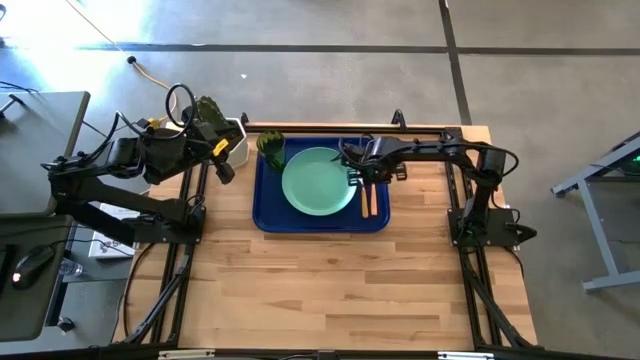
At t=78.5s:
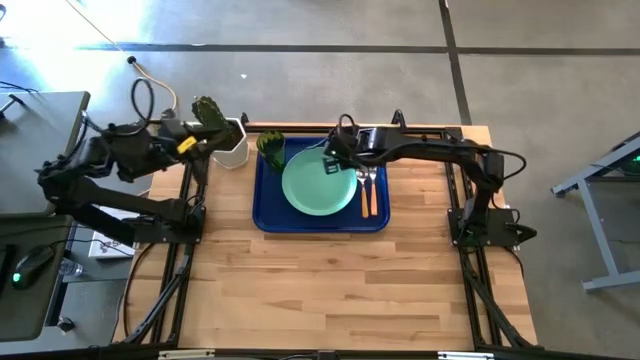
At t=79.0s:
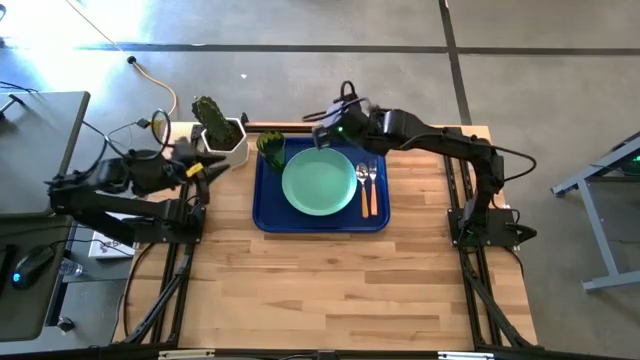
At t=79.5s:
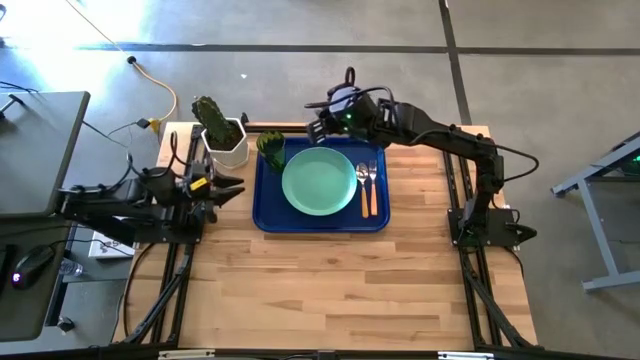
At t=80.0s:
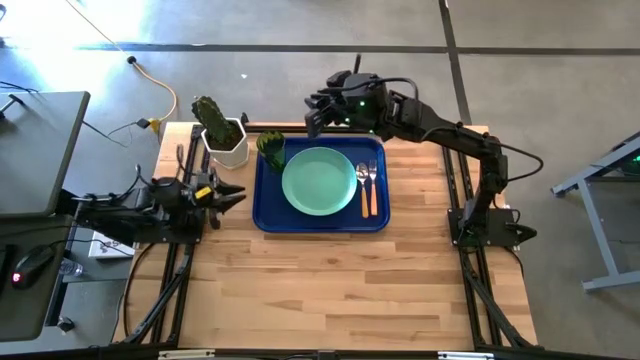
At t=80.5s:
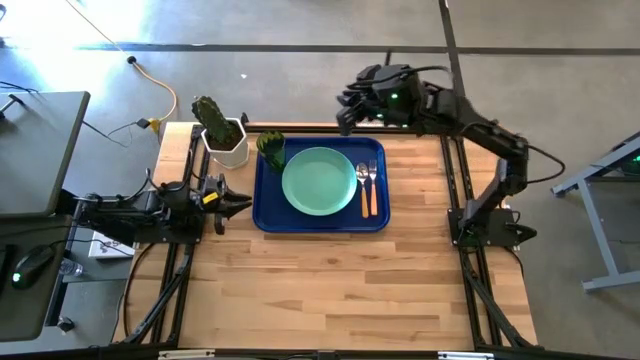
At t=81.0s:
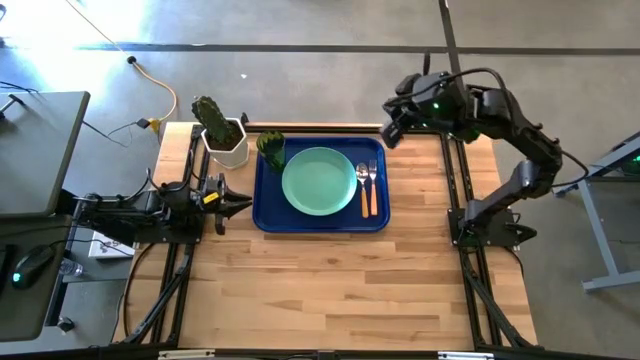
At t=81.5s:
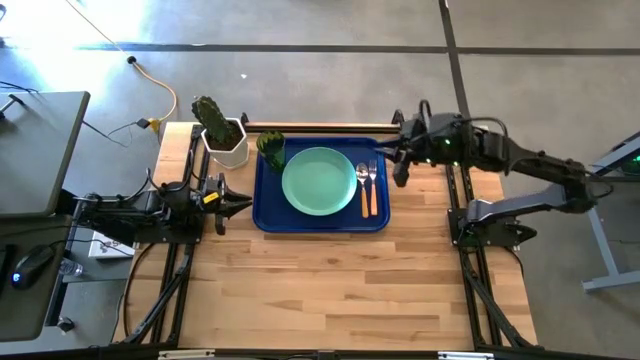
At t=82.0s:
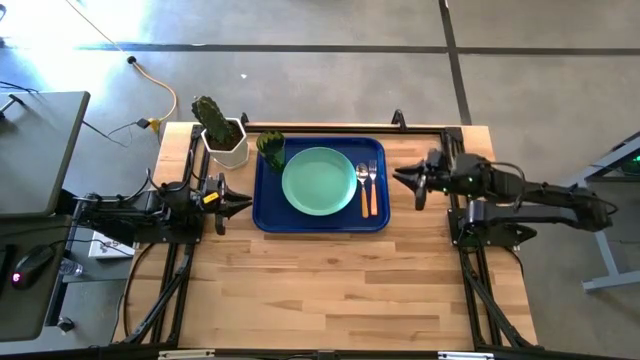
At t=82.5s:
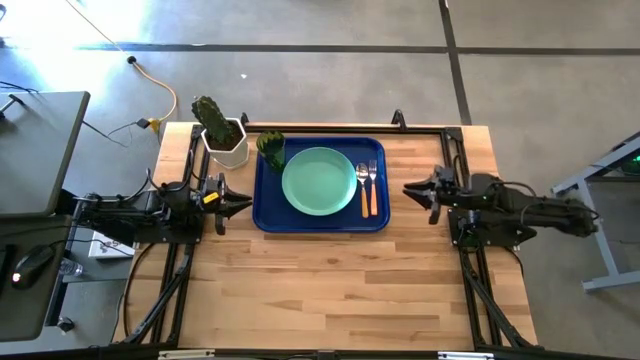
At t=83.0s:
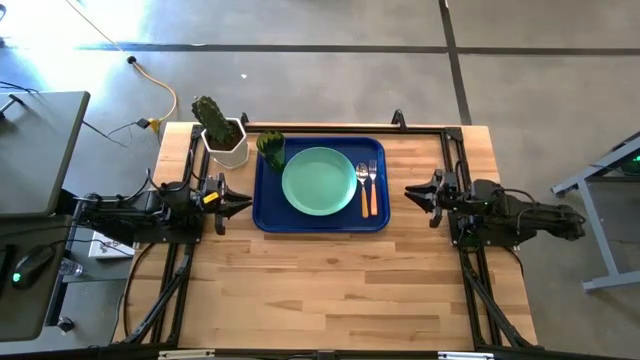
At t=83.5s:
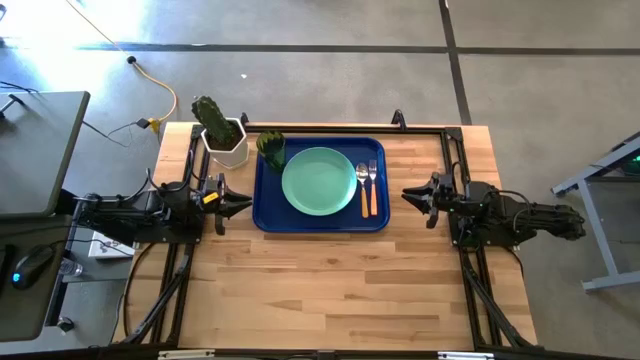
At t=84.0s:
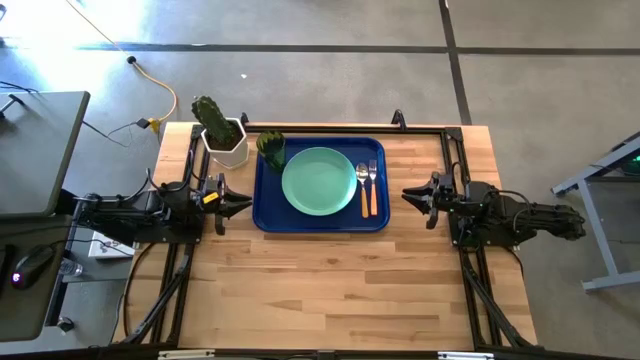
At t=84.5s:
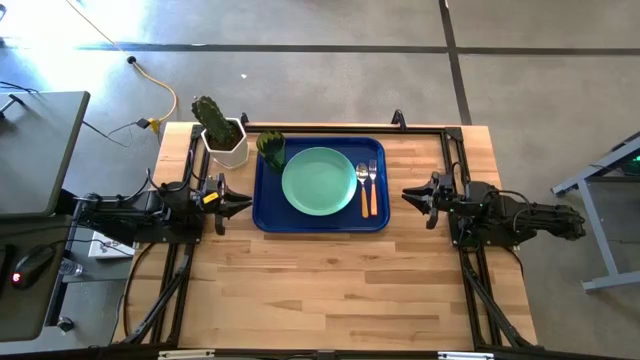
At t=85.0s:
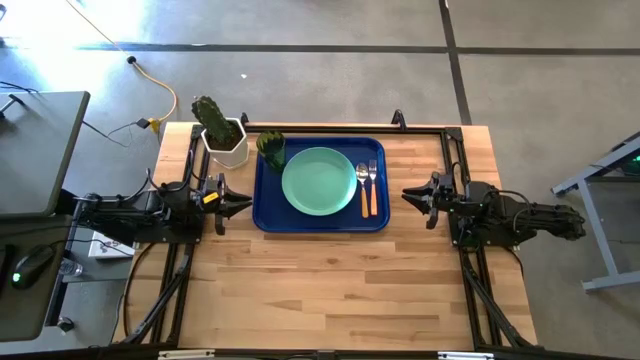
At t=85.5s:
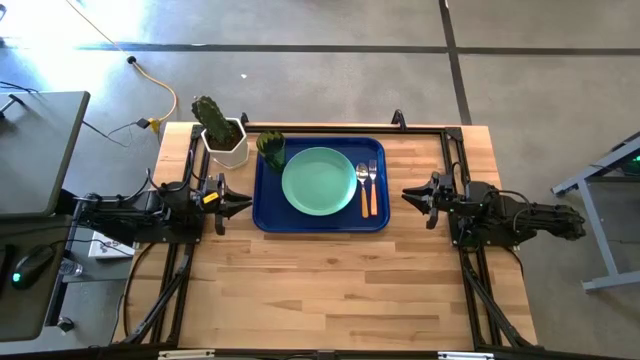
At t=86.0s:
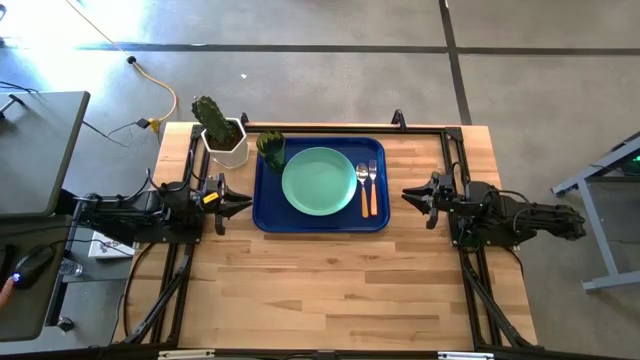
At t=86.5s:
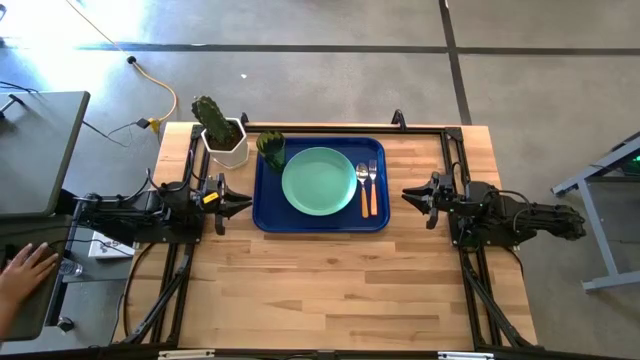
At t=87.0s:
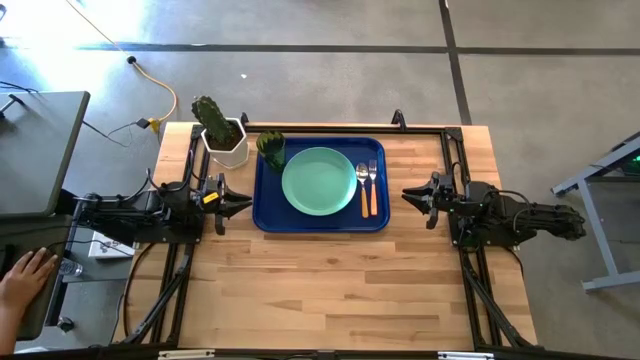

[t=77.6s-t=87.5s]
Task: Pick and place plate/cup/fork/spoon on tray
Return to Home Position

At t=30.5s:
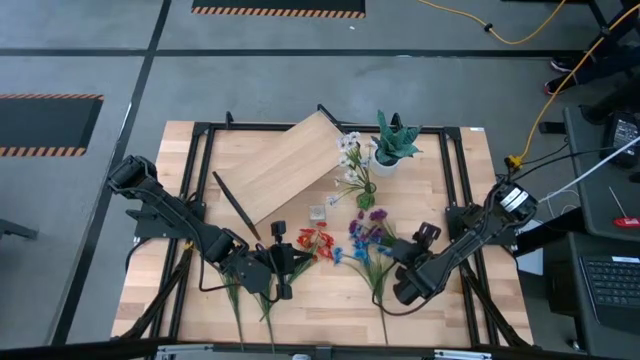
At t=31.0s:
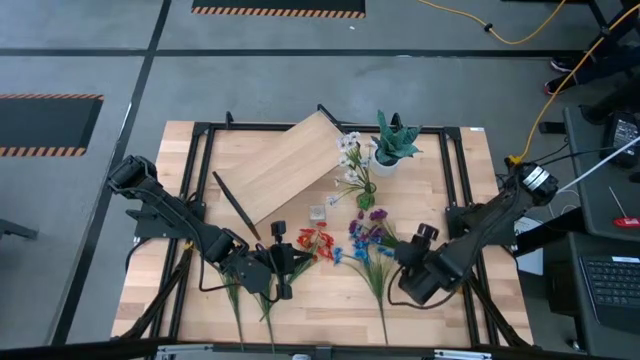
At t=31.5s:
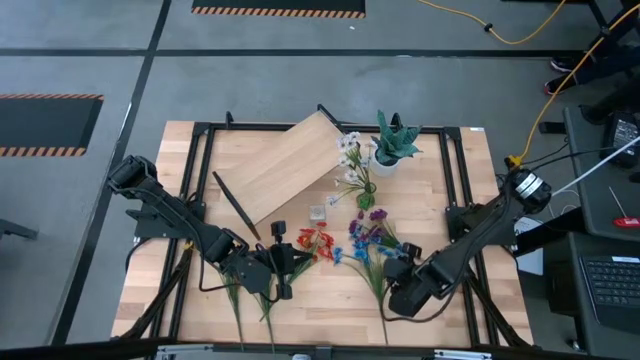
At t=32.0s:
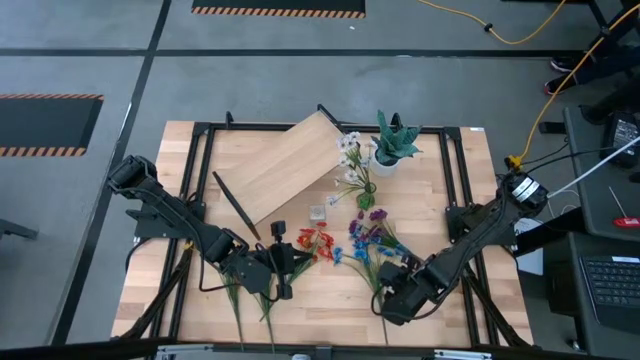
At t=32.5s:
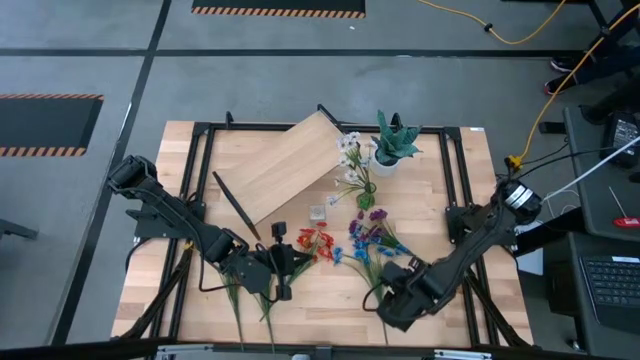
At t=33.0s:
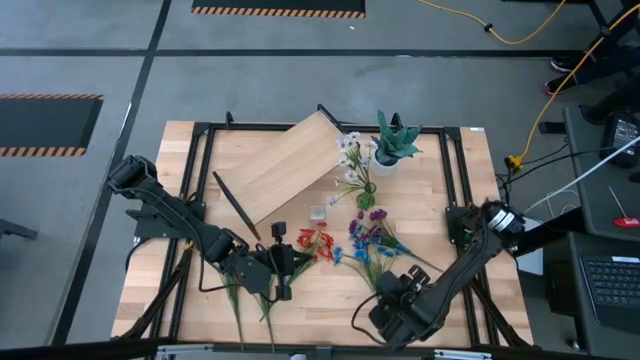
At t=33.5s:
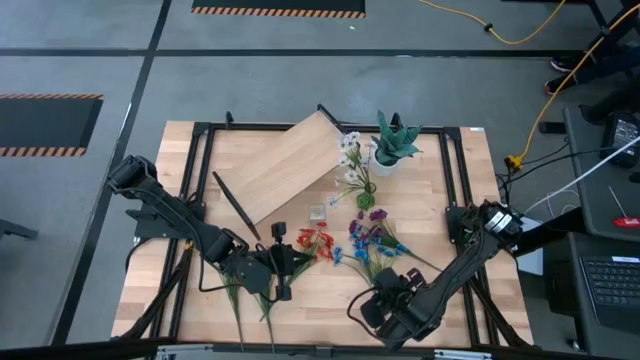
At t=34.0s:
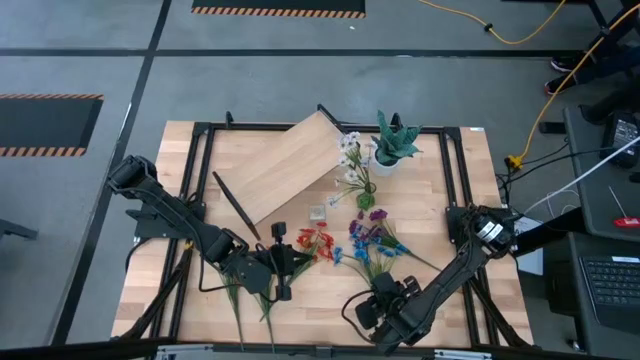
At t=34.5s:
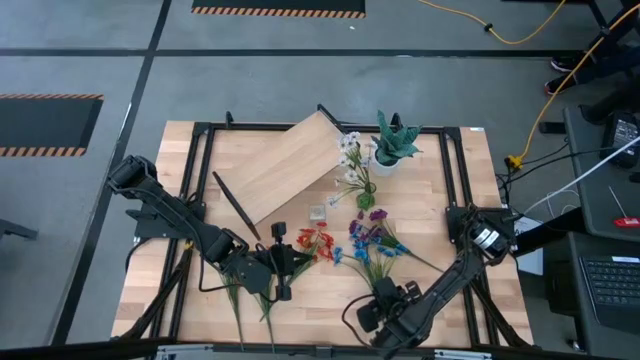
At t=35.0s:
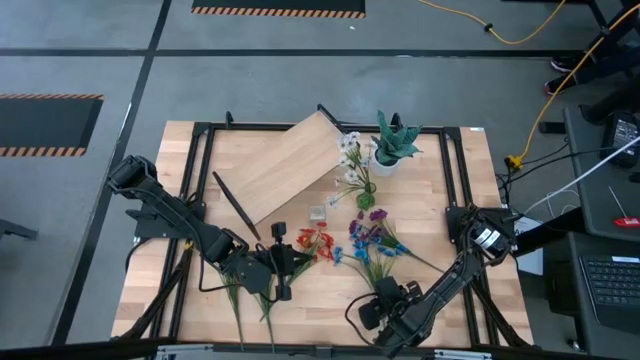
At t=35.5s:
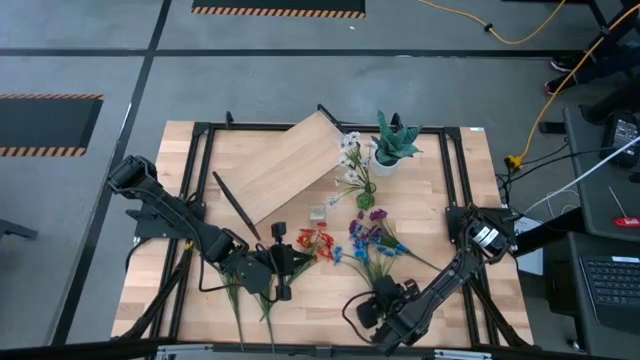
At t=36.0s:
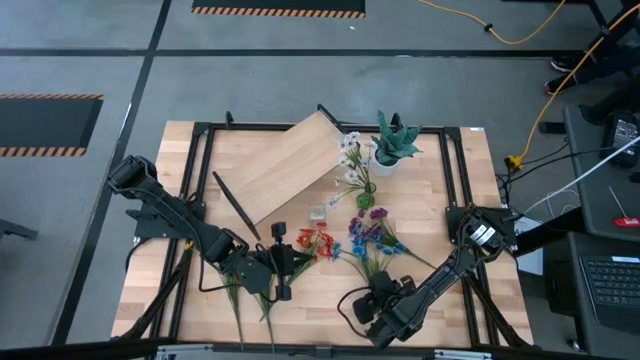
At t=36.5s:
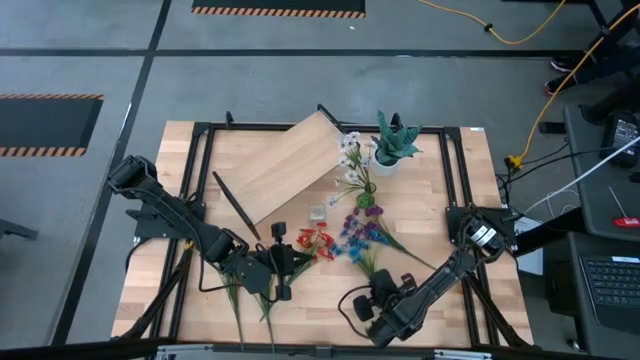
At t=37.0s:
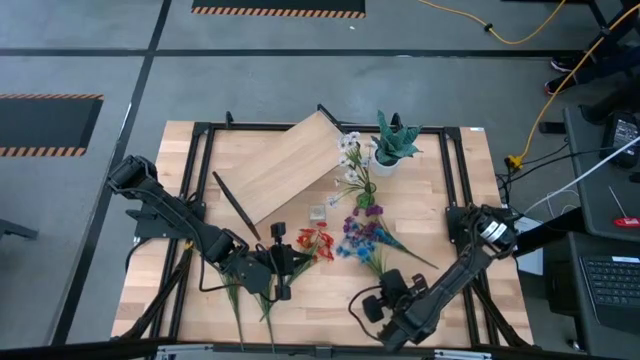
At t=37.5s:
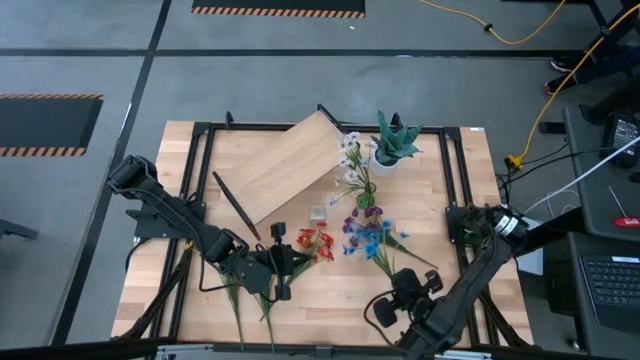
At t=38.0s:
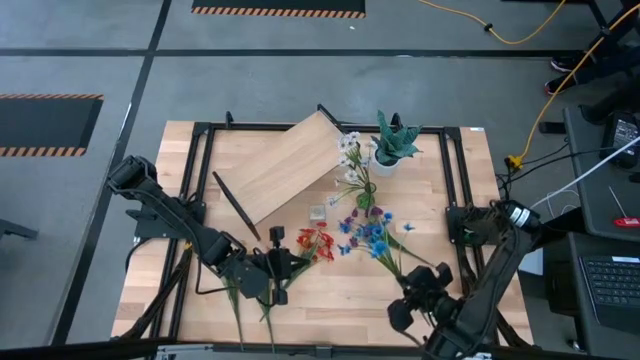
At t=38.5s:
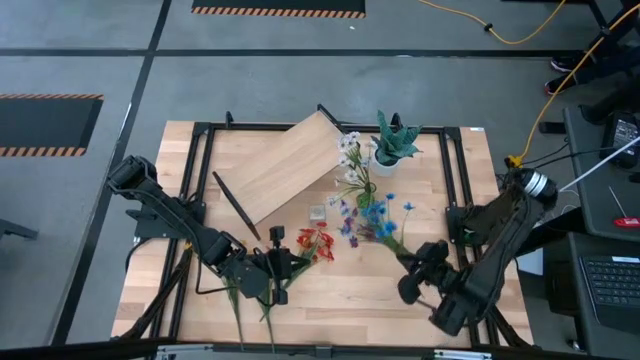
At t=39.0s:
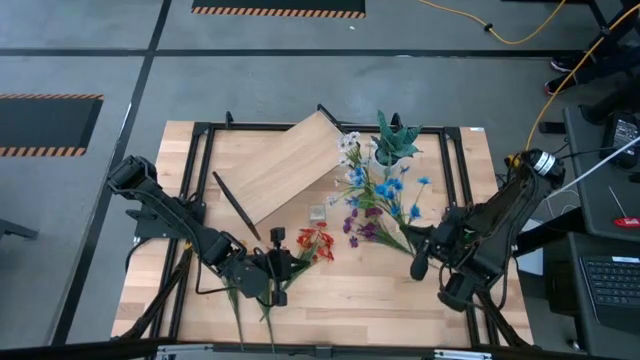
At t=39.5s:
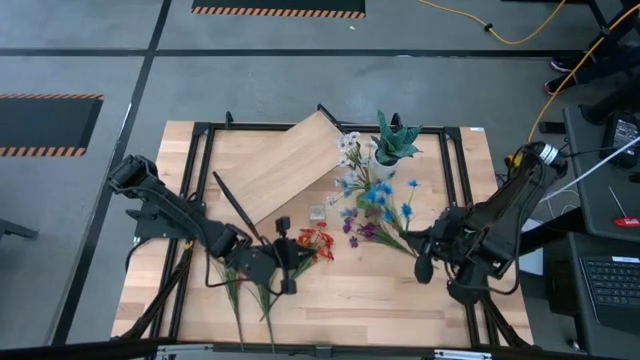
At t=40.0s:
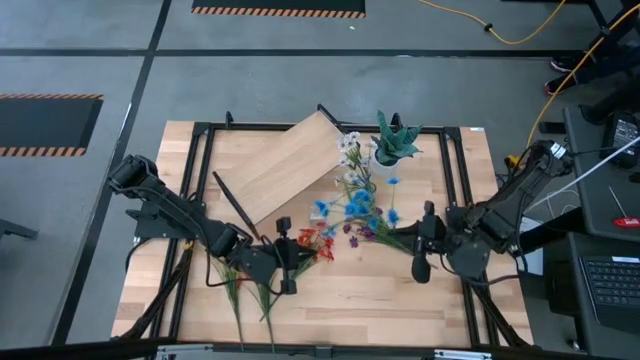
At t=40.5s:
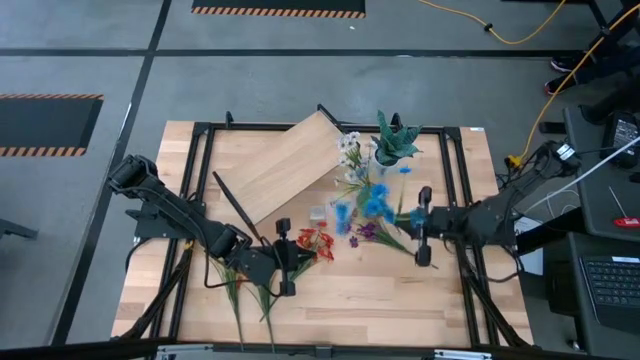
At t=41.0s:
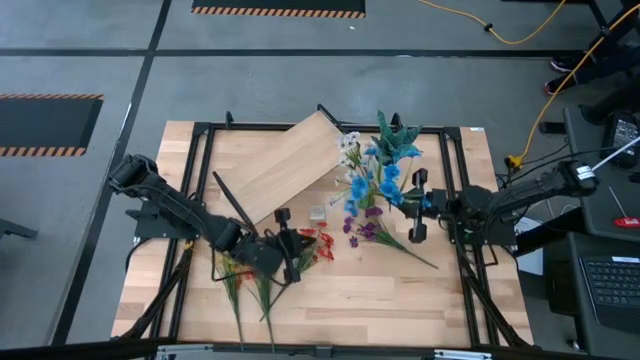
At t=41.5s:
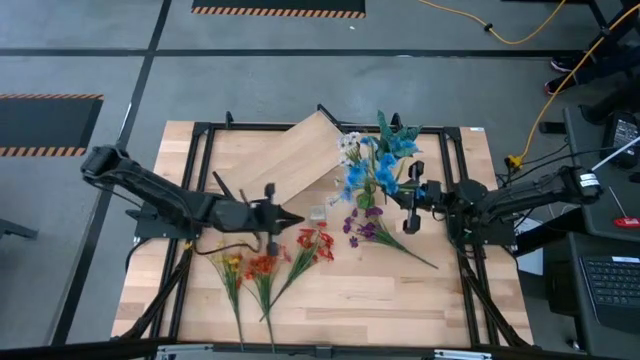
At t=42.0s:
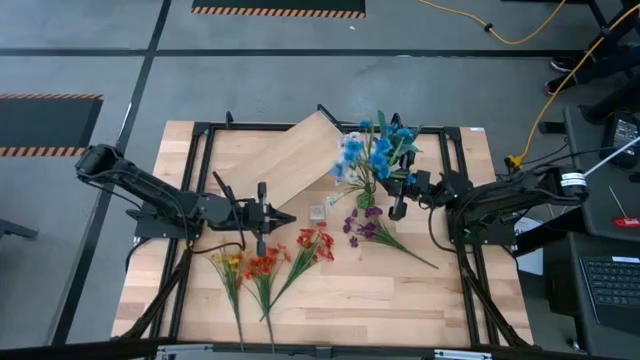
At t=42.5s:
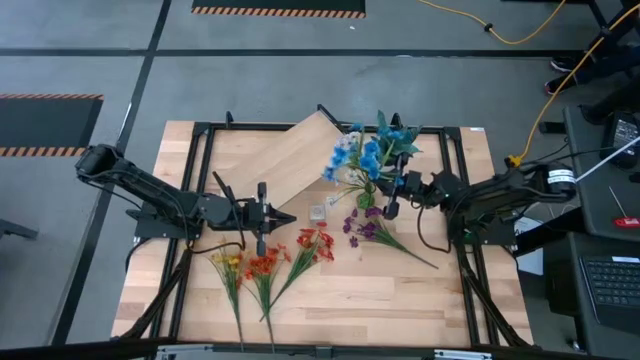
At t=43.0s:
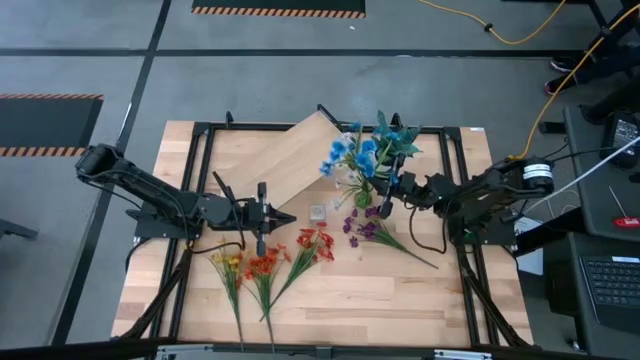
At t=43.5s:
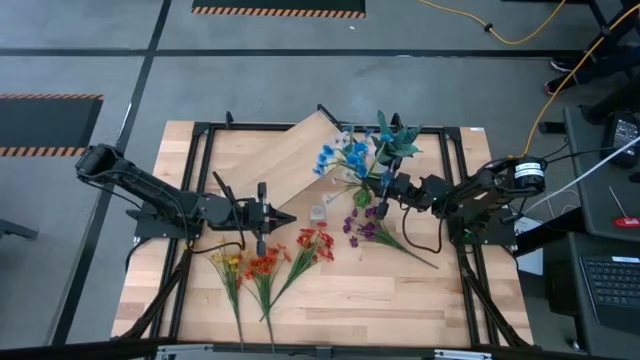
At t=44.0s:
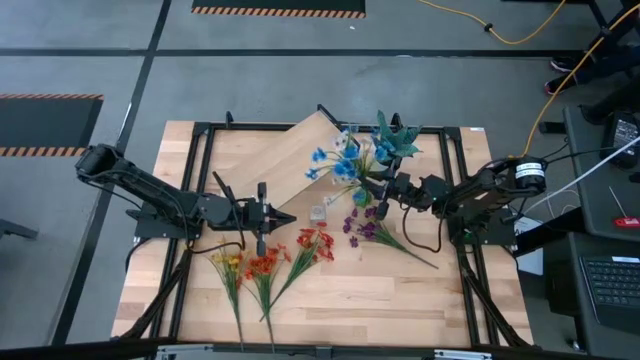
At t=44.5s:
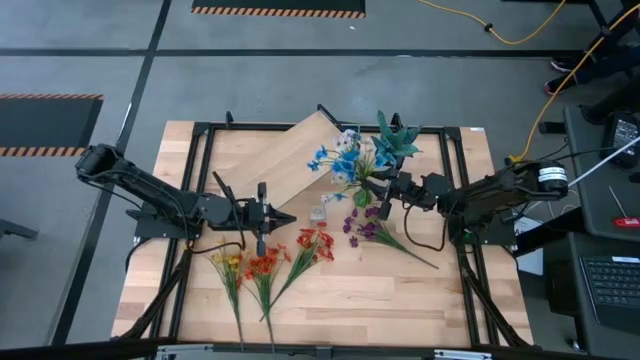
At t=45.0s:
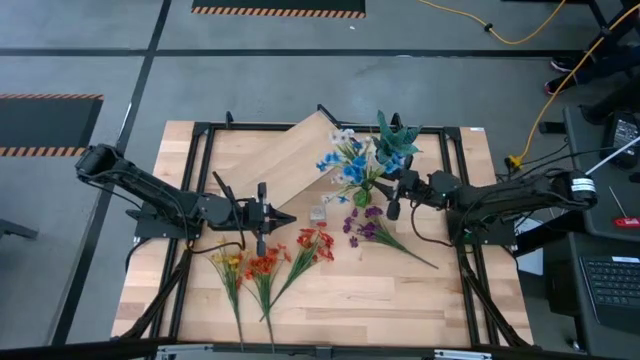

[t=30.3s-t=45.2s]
Task: Pick and place flowers into a vace then onto a shelf
Put the blue flowers into the green vase
